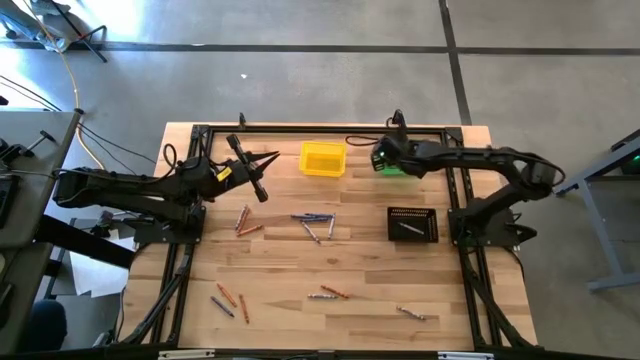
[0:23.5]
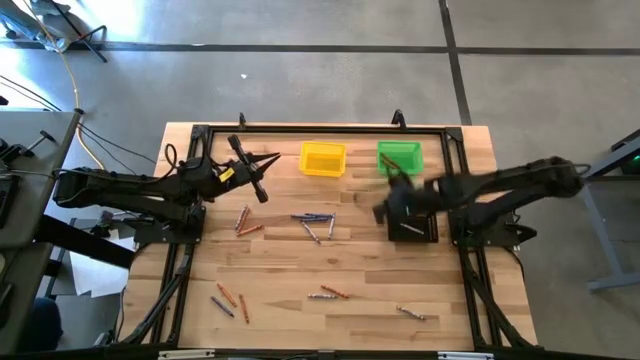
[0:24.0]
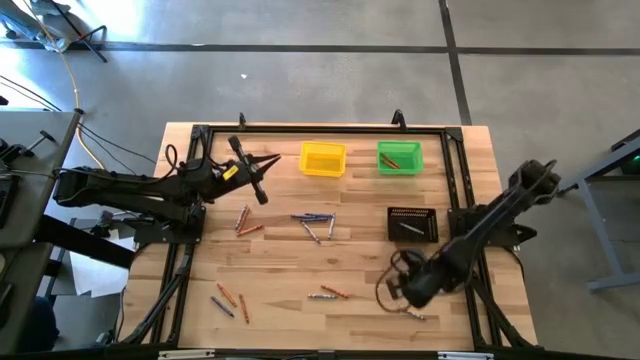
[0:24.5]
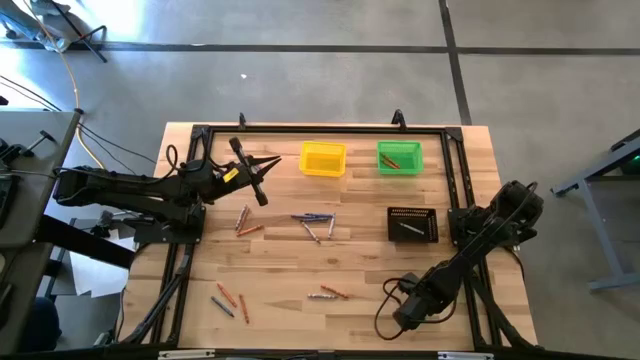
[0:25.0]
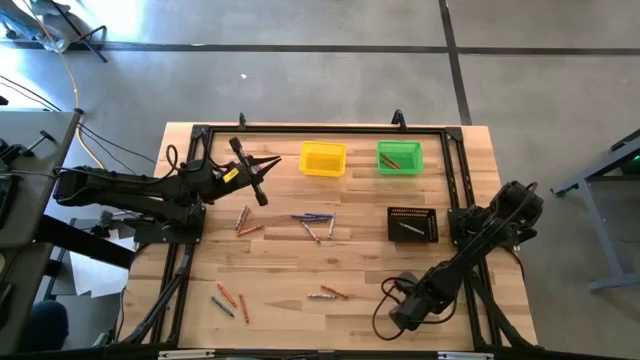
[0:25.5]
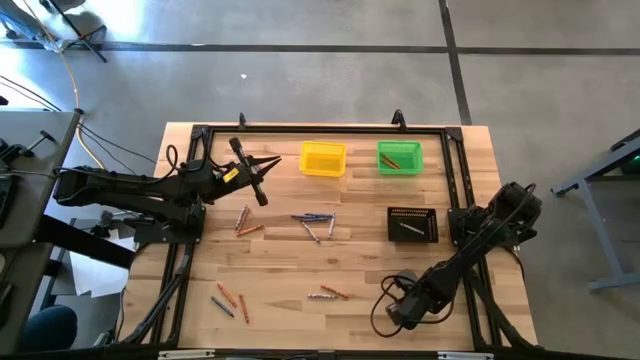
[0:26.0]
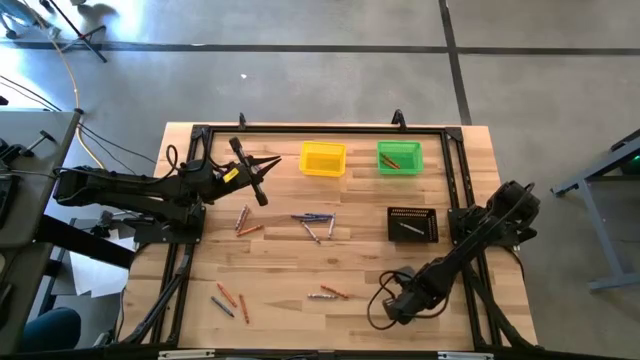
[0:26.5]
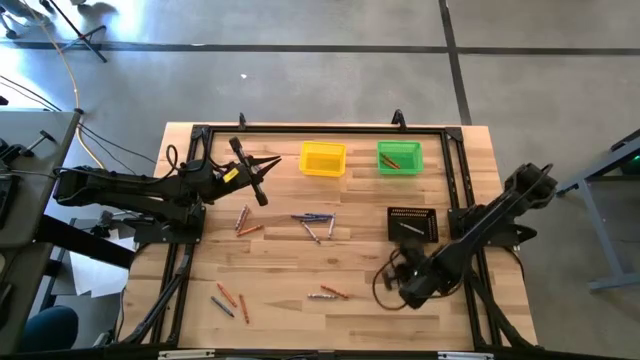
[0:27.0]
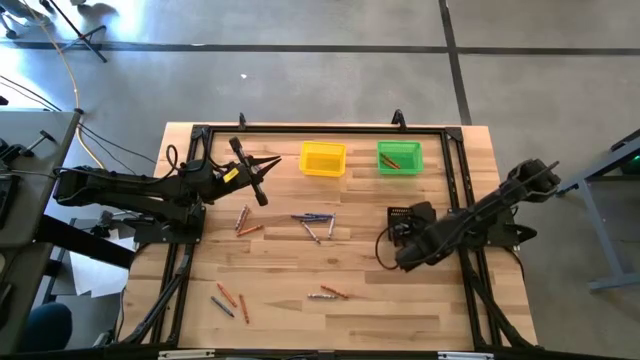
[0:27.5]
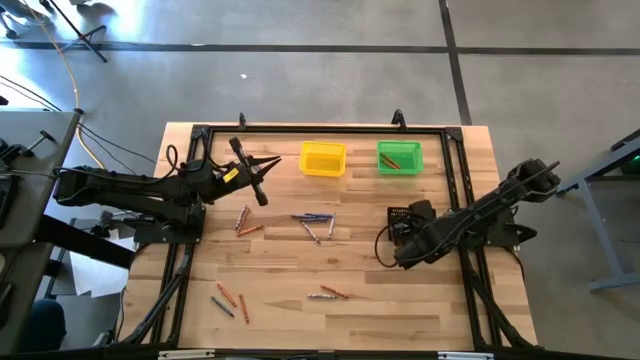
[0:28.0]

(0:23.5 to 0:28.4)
Task: Sort crayons
Put the gray crayon into the black bin

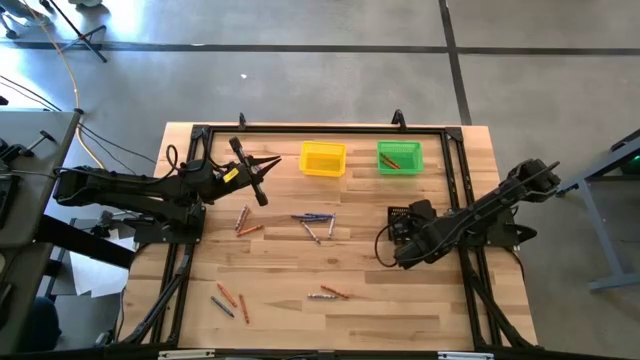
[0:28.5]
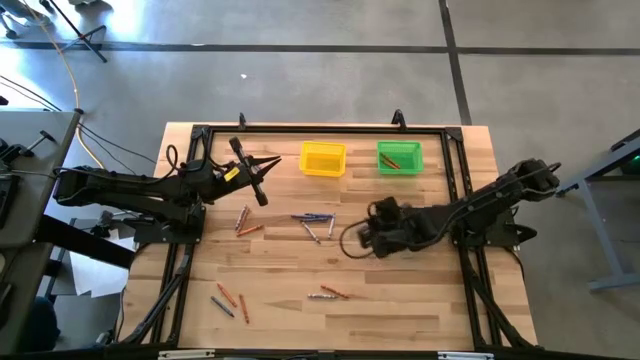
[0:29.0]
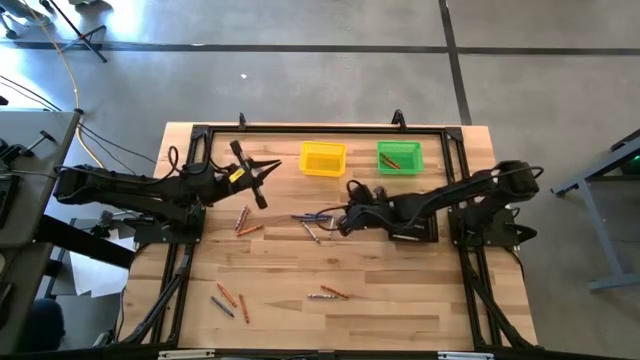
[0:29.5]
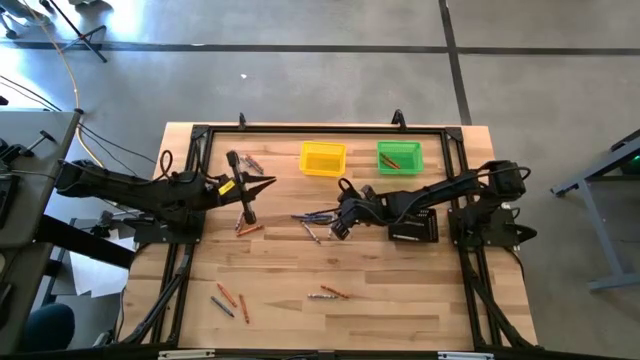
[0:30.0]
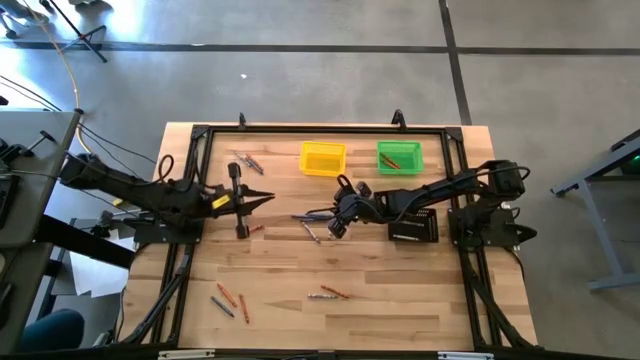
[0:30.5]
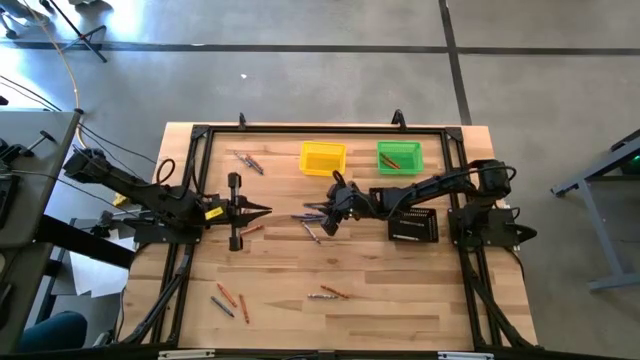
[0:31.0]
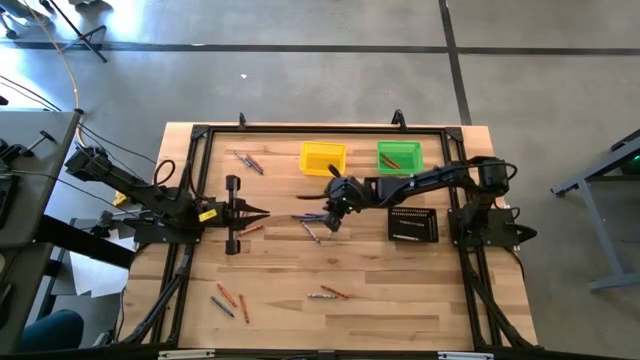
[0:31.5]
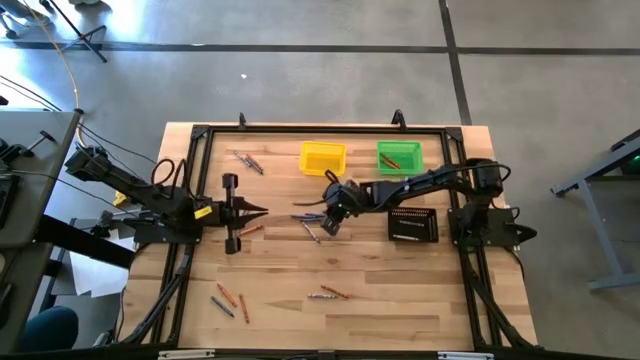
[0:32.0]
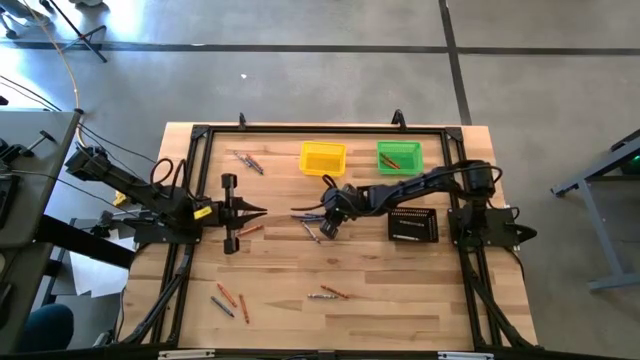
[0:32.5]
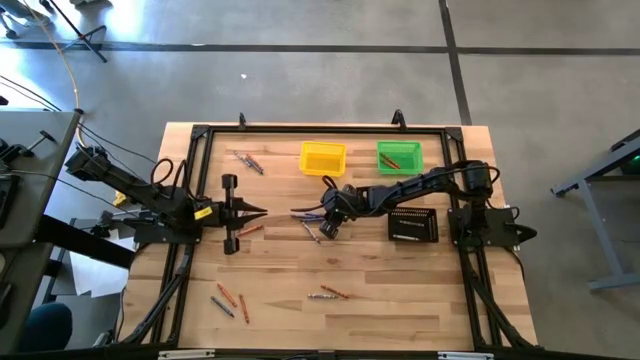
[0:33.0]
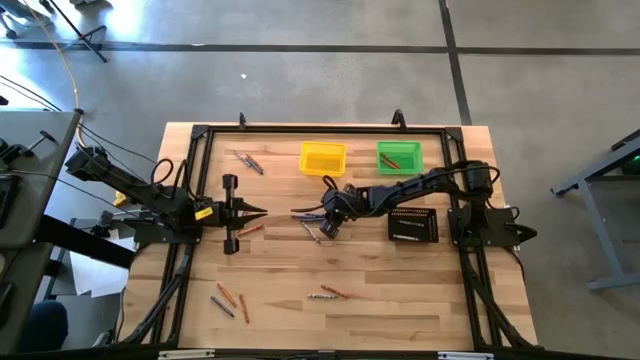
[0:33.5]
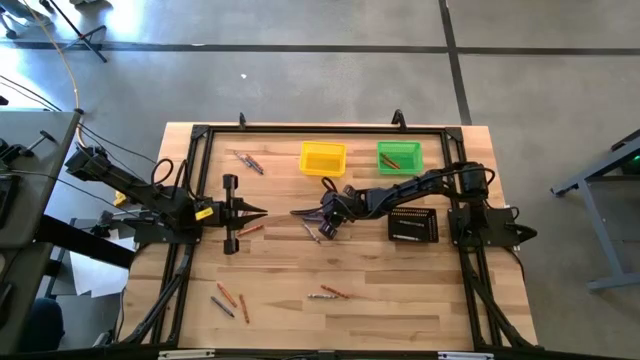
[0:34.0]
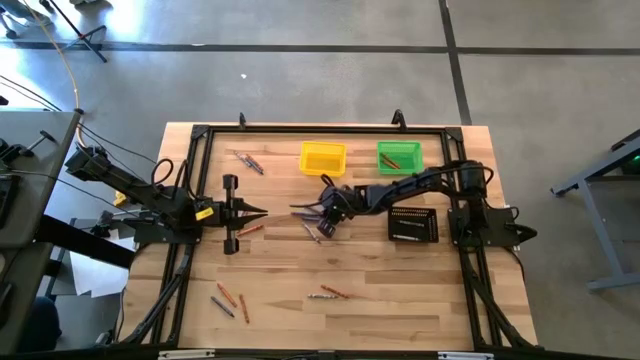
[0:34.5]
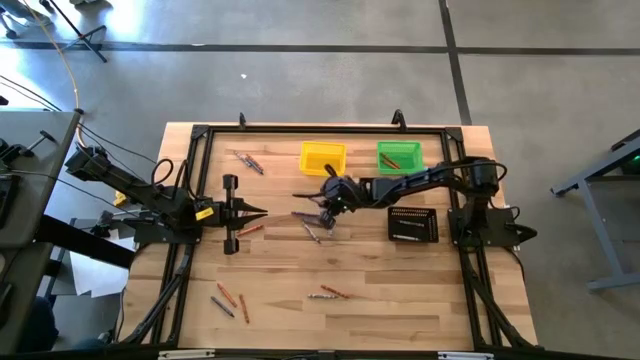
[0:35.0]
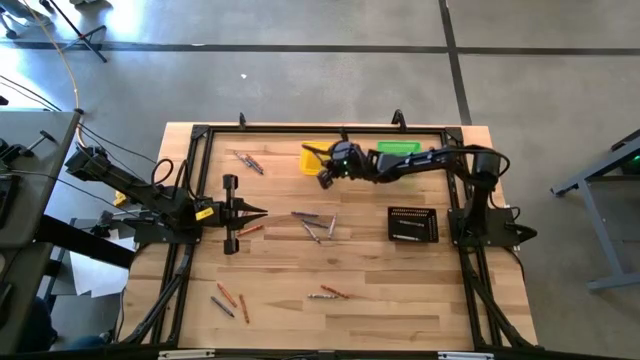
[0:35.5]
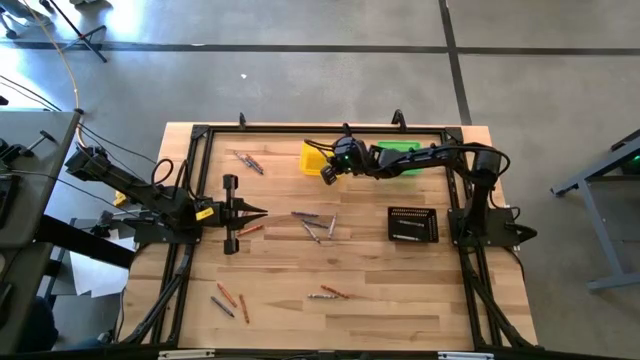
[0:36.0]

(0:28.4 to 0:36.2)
Put the blue crayon into the yellow bin

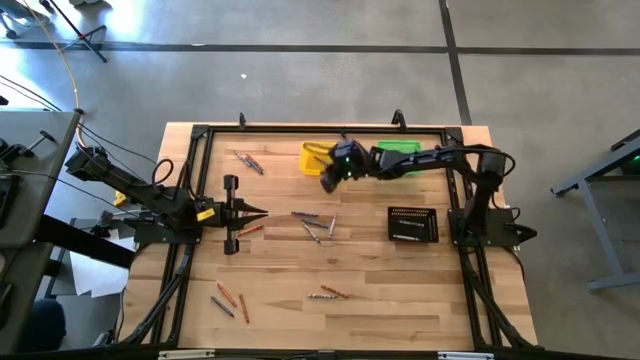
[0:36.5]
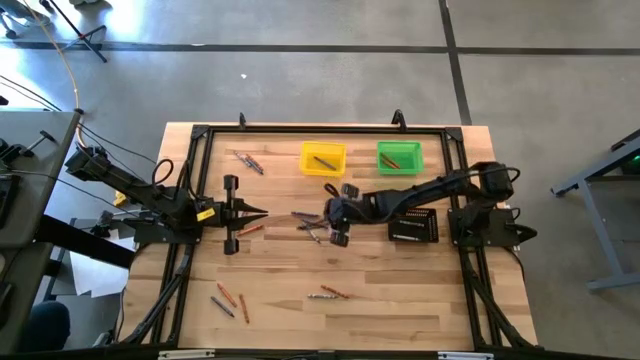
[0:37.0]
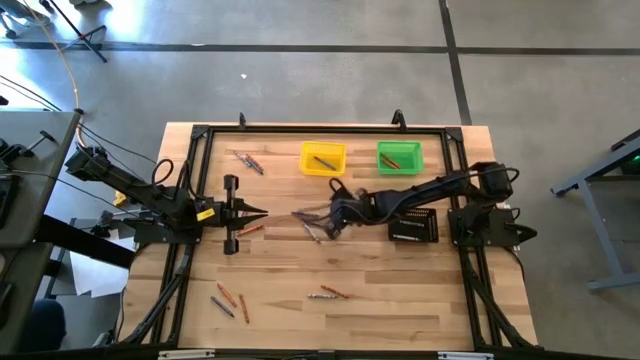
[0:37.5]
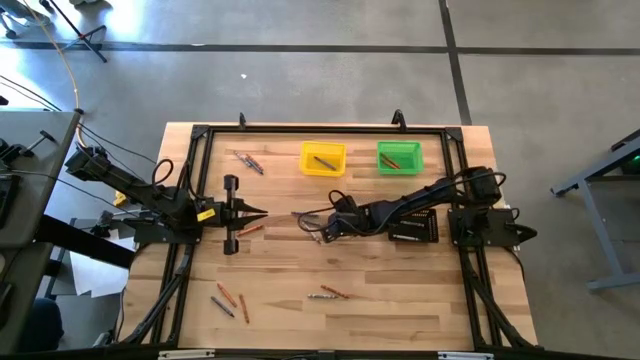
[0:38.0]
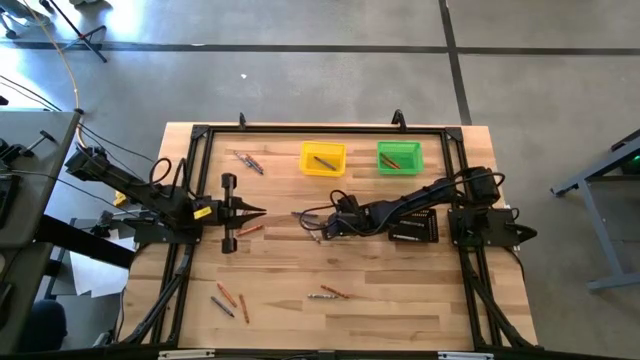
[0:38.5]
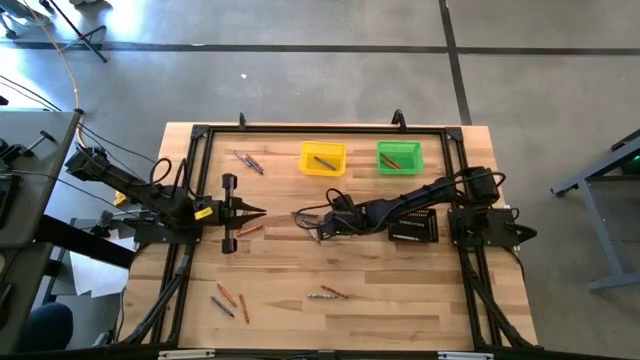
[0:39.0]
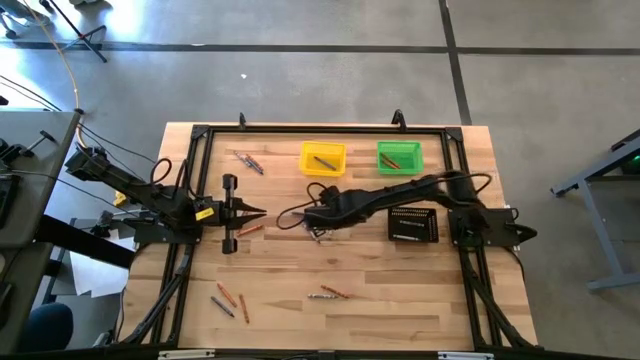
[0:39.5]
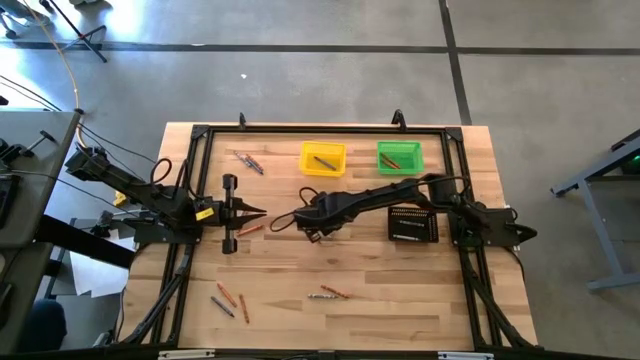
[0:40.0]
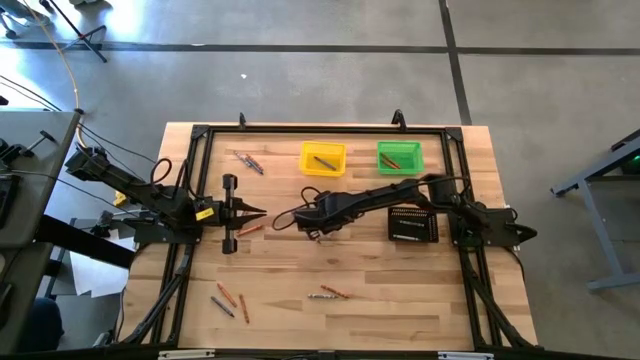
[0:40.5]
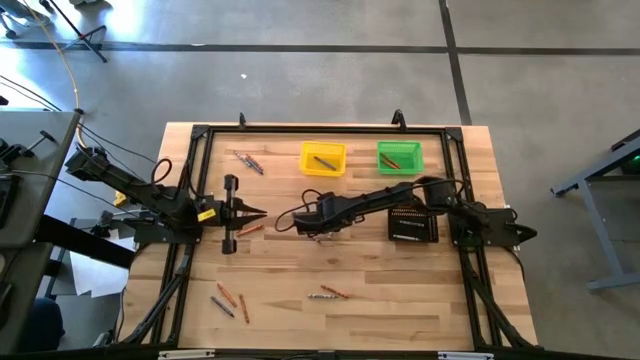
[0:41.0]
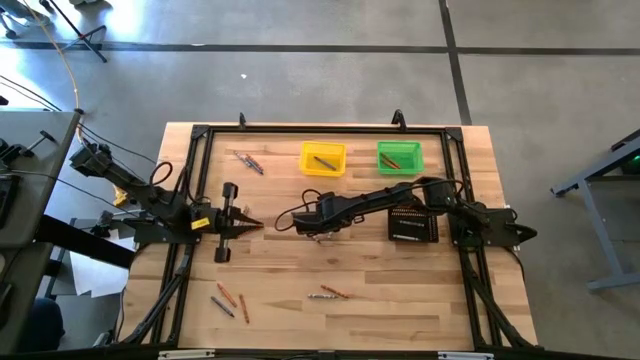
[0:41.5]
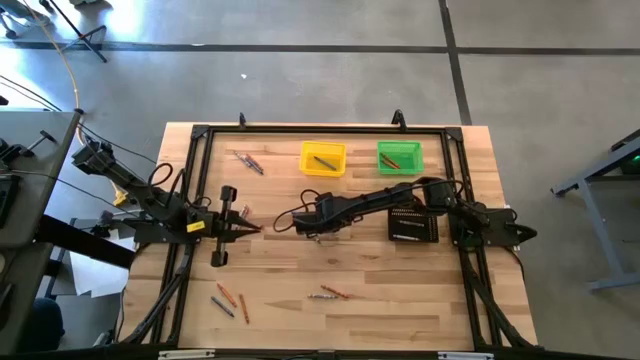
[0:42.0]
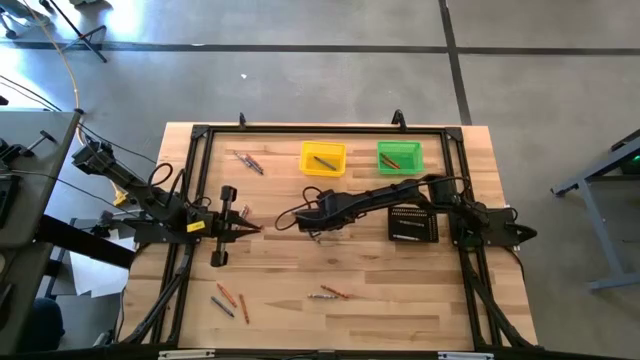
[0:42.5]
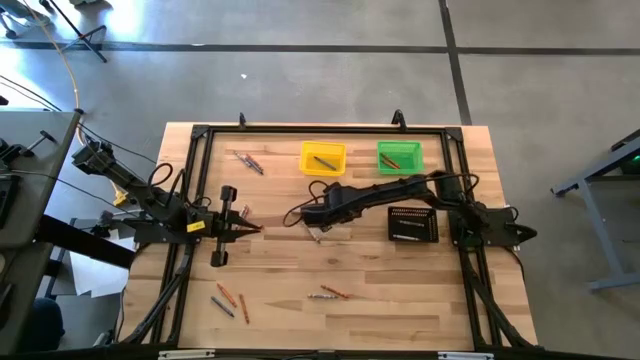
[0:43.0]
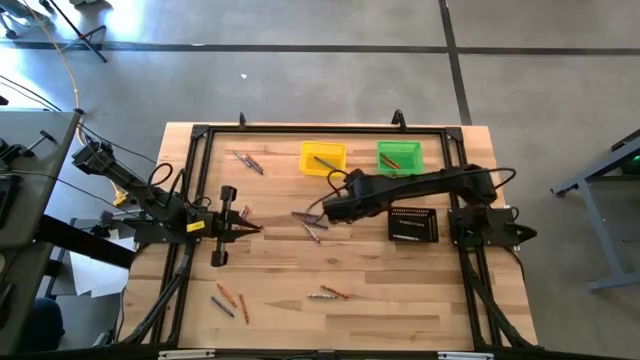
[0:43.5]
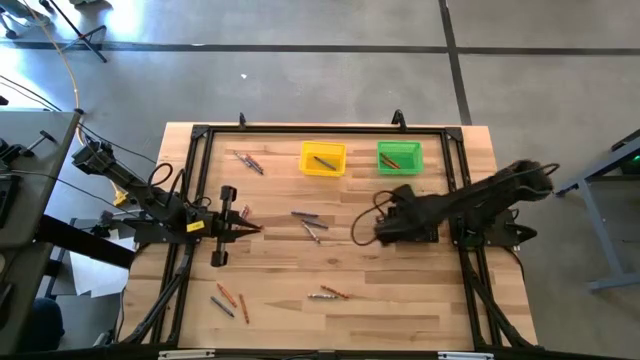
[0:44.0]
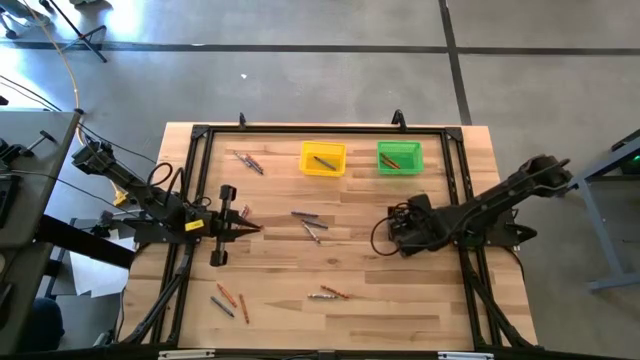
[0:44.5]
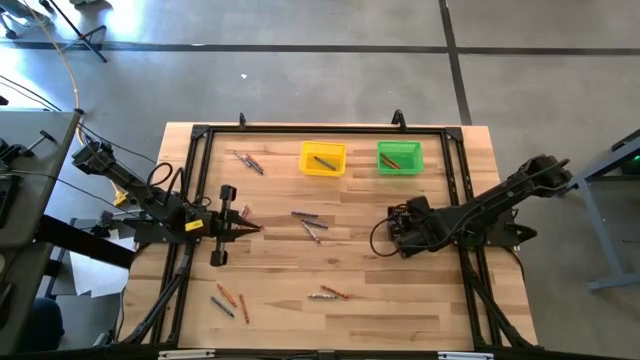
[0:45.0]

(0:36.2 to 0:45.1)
Put the gray crayon into the black bin
